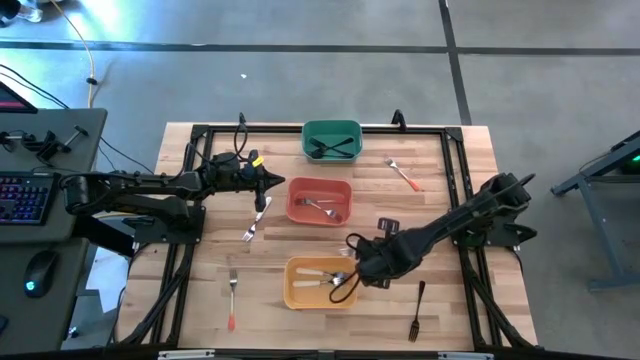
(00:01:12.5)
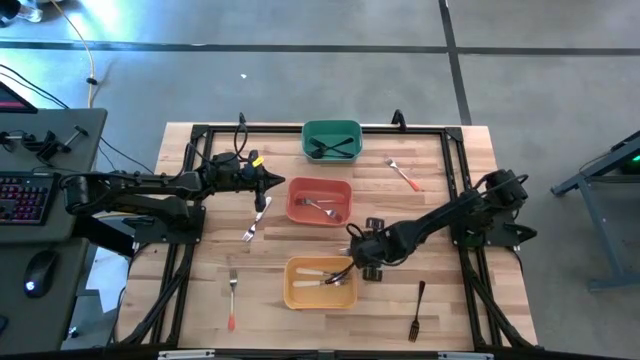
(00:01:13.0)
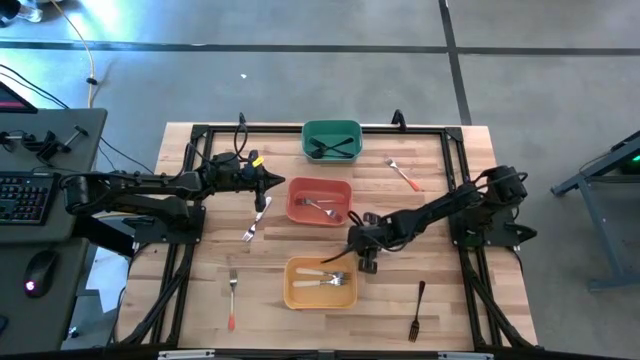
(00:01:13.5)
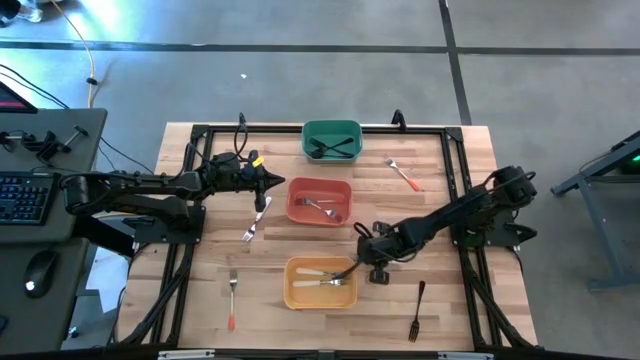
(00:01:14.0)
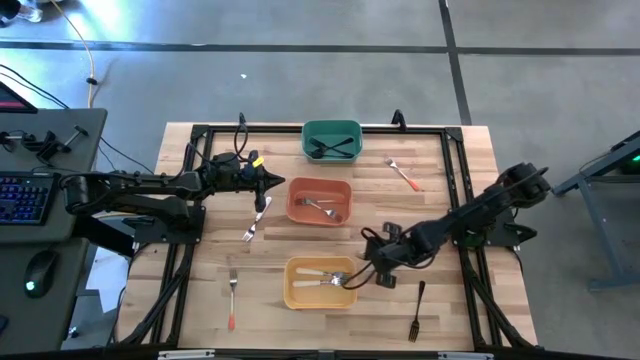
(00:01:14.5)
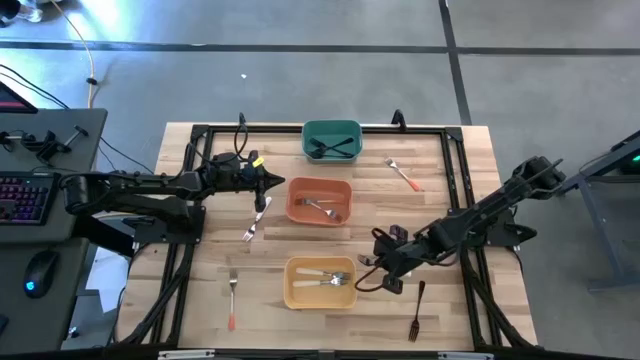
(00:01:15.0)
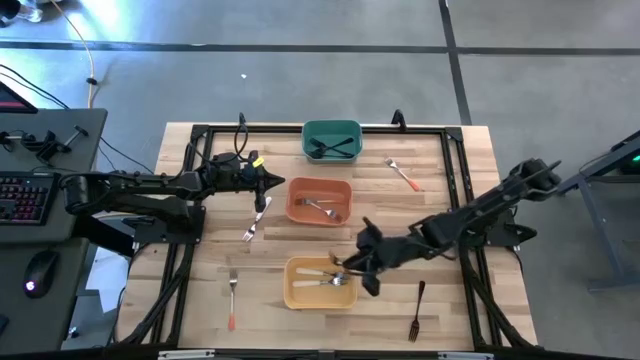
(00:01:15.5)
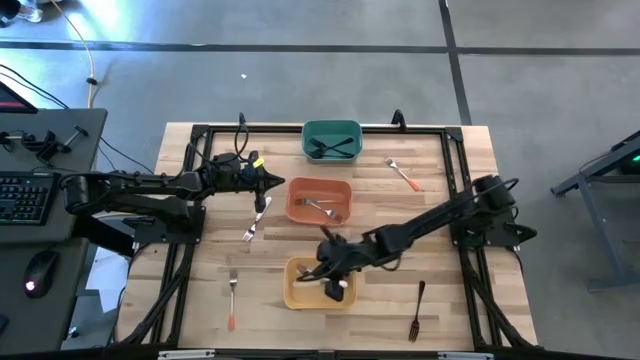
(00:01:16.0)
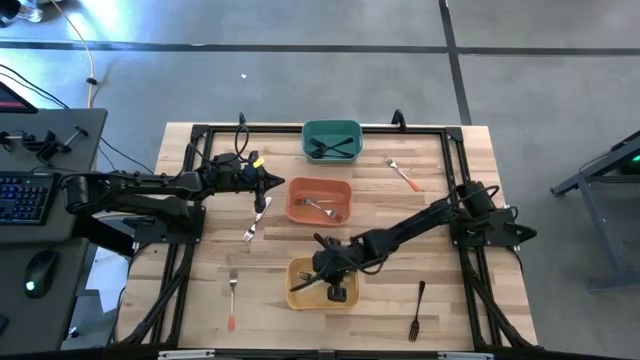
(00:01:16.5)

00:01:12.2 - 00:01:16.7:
Task: Sort silverware by color (type)
Put the white fork into the yellow bin

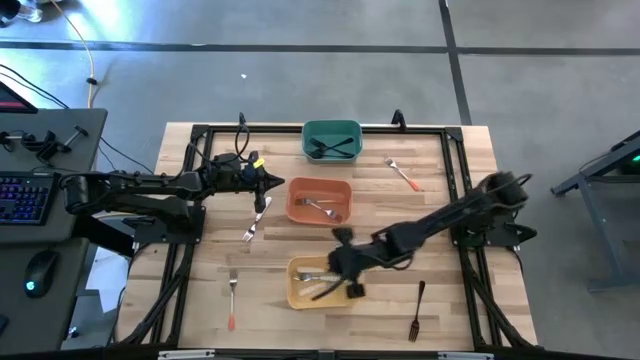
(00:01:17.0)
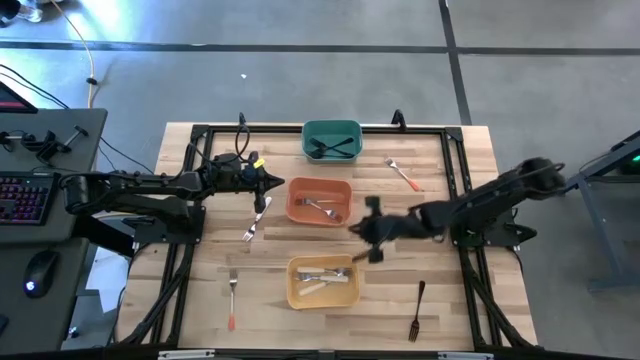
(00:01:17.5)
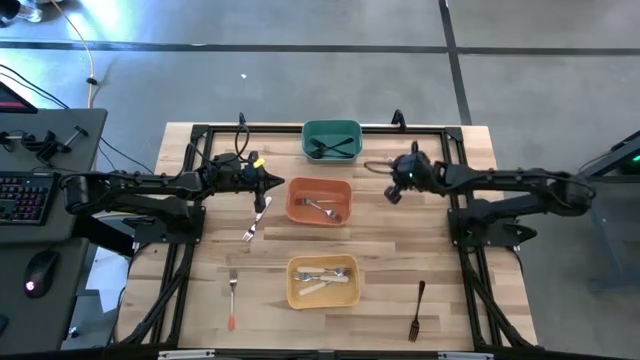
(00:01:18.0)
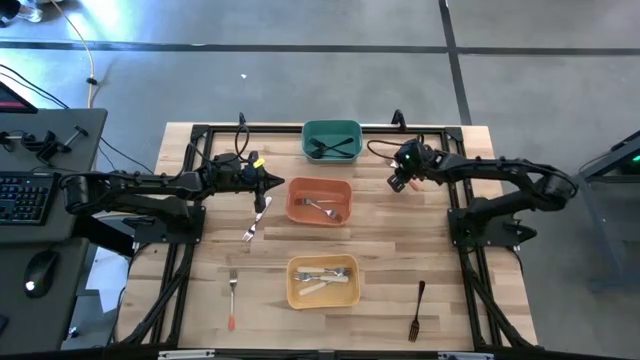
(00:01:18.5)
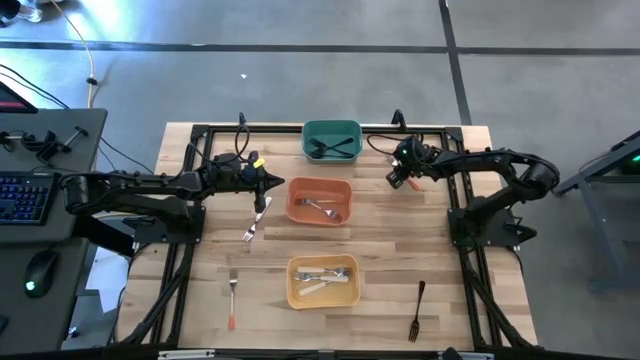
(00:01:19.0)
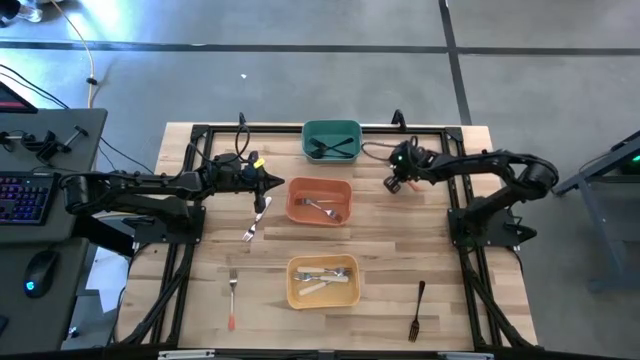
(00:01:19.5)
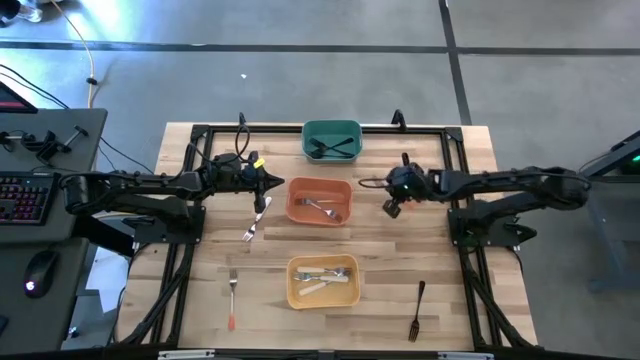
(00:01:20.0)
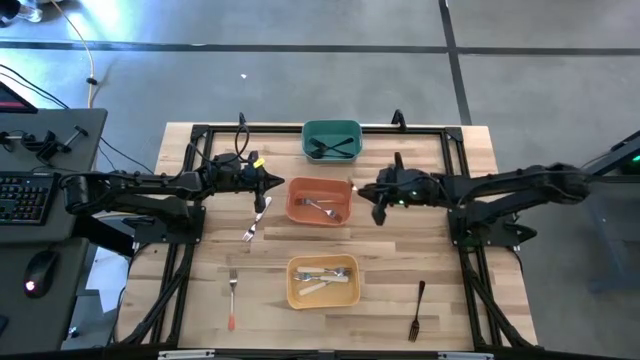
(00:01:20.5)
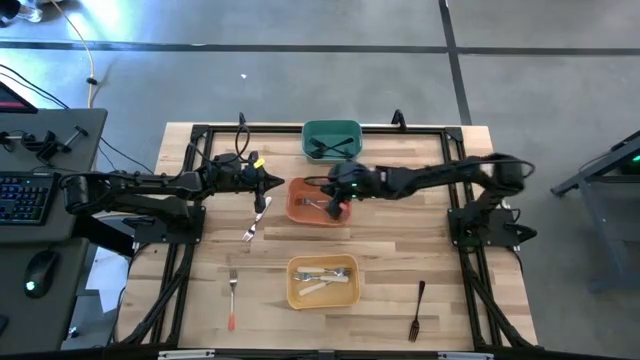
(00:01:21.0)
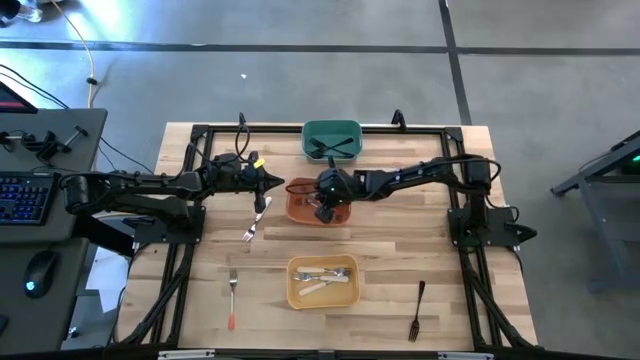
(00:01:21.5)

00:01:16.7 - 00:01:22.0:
Put the orange fork into the orange bin

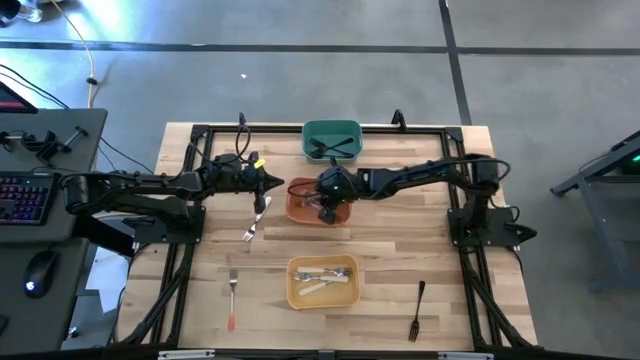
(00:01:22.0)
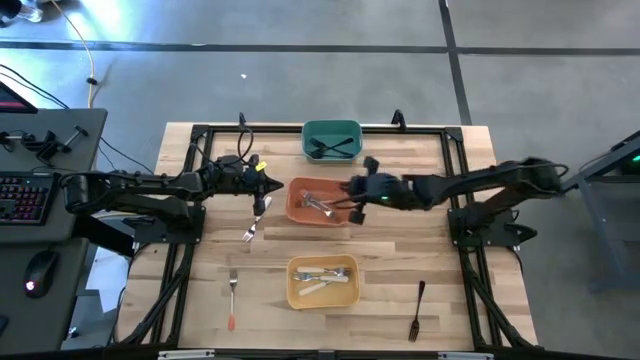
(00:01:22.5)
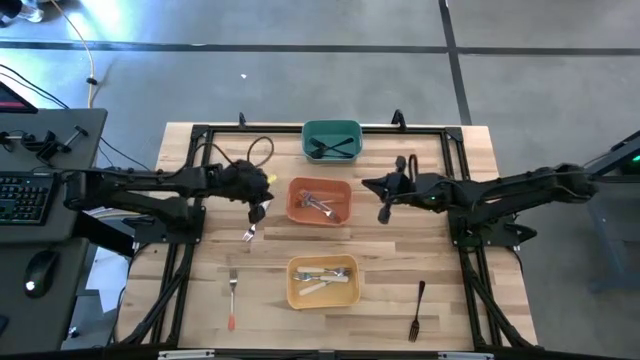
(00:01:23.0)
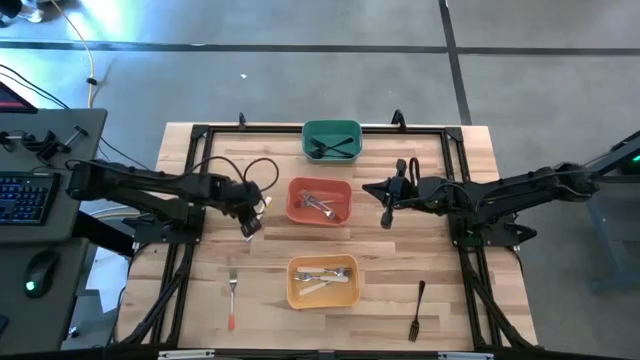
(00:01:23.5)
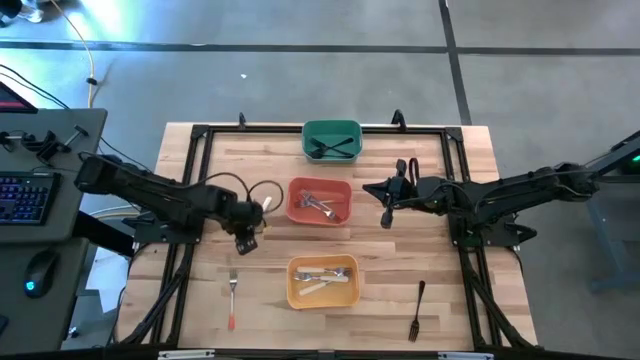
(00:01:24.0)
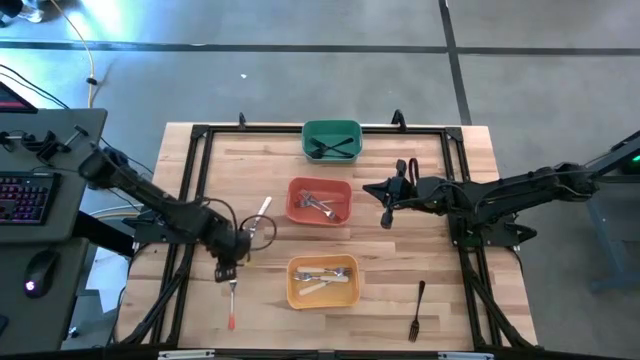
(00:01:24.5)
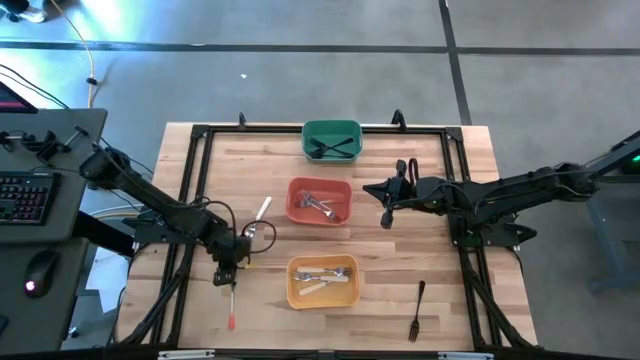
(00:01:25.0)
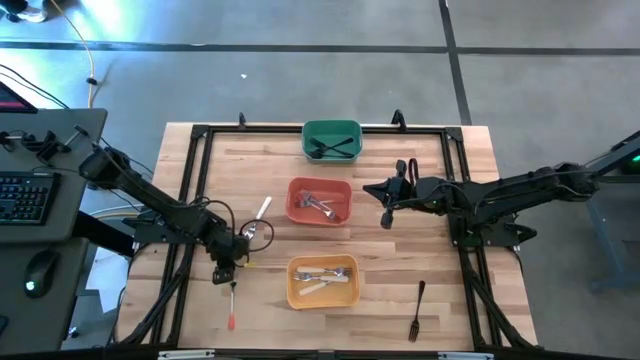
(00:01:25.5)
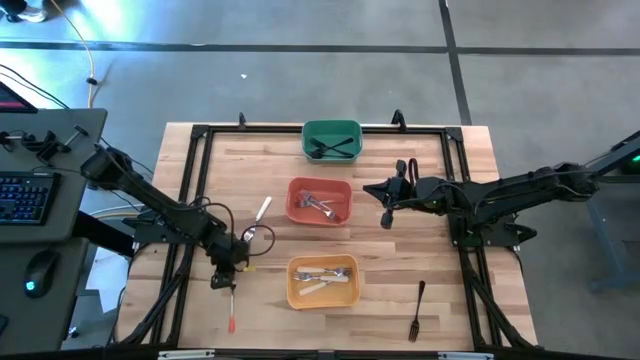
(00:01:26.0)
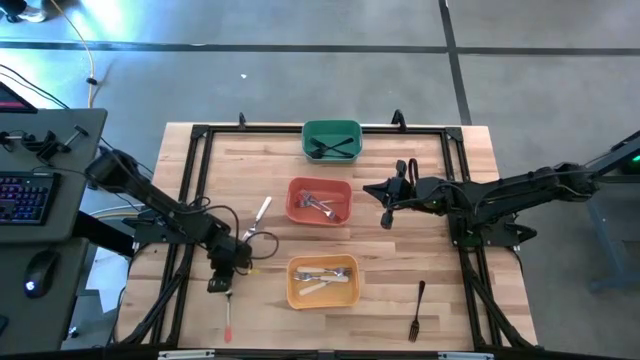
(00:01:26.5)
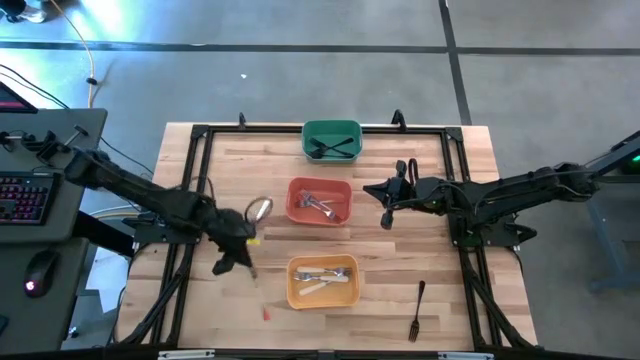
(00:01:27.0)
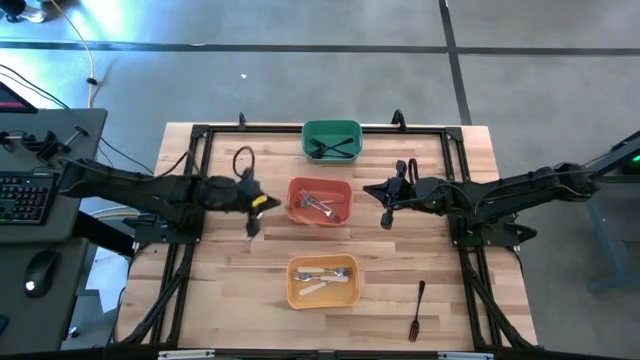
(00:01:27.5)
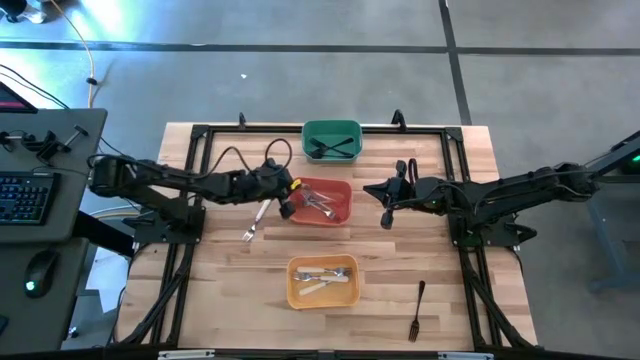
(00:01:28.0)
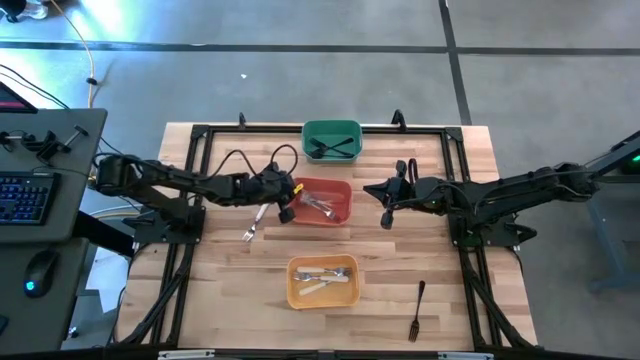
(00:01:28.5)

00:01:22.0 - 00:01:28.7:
Put the orange fork into the orange bin

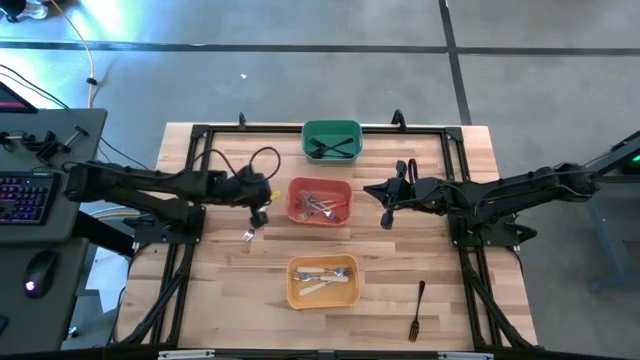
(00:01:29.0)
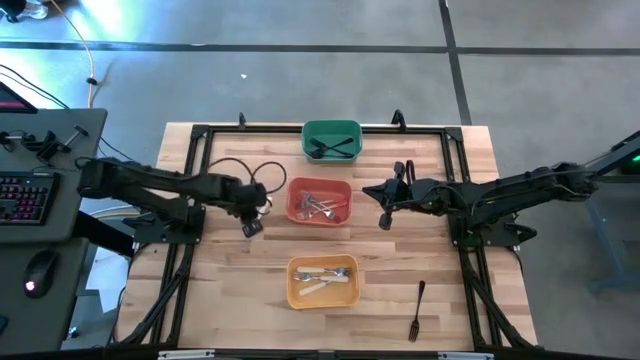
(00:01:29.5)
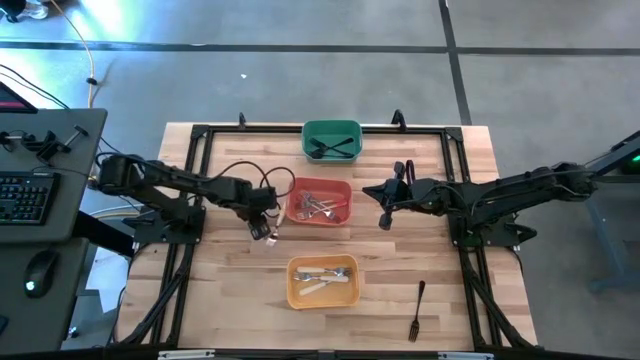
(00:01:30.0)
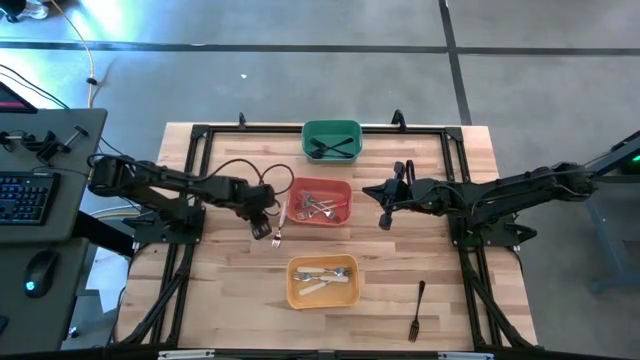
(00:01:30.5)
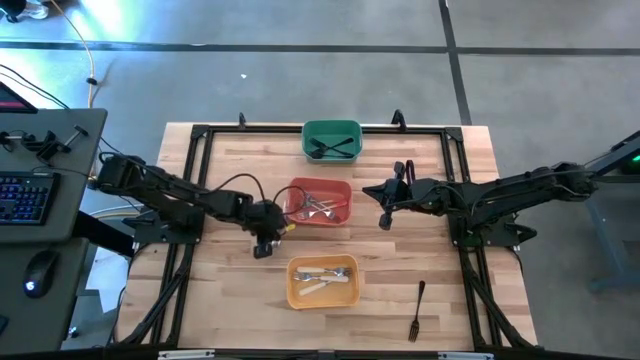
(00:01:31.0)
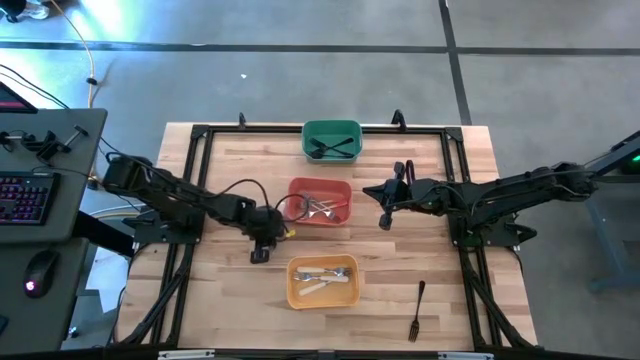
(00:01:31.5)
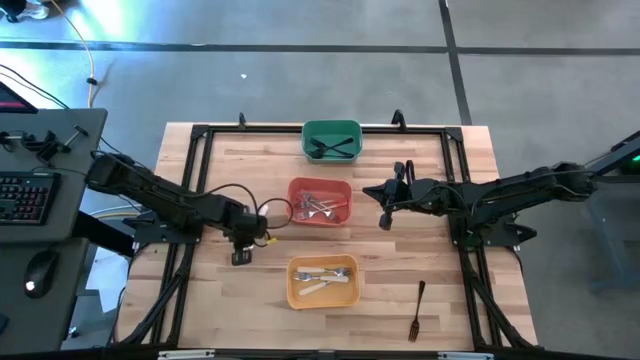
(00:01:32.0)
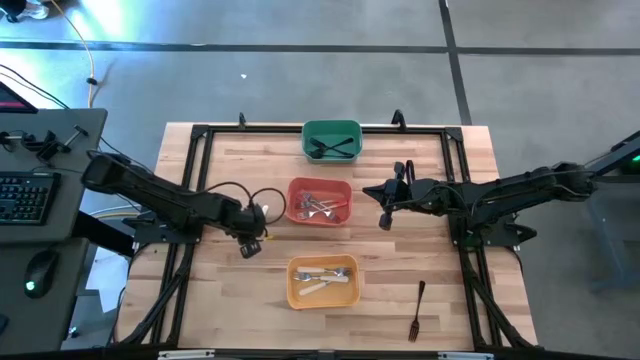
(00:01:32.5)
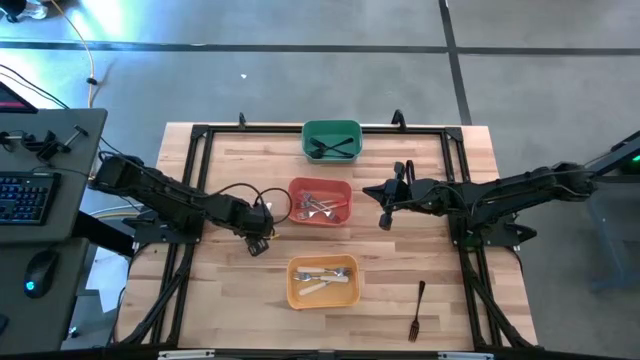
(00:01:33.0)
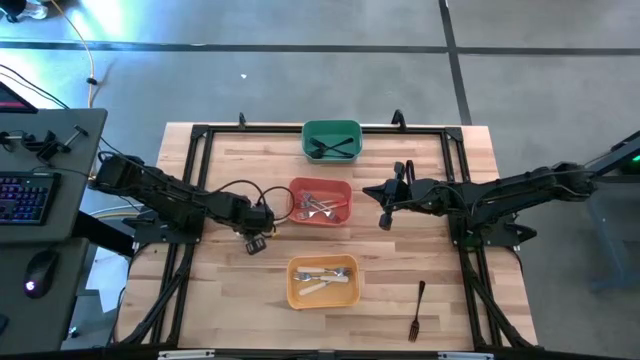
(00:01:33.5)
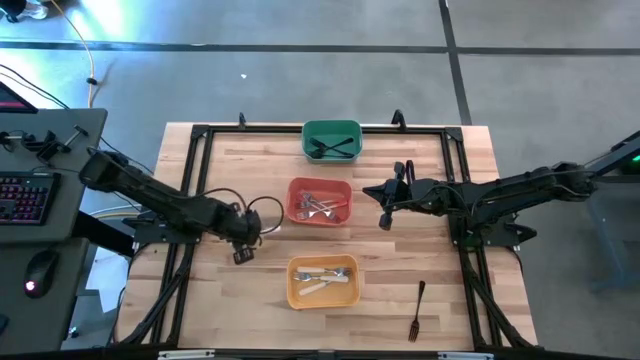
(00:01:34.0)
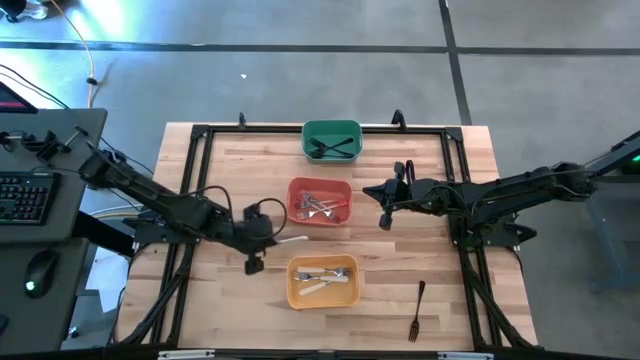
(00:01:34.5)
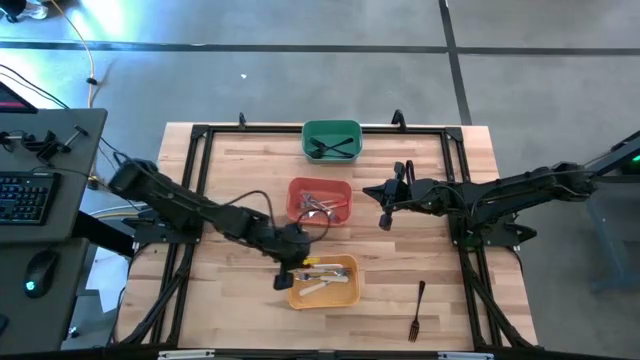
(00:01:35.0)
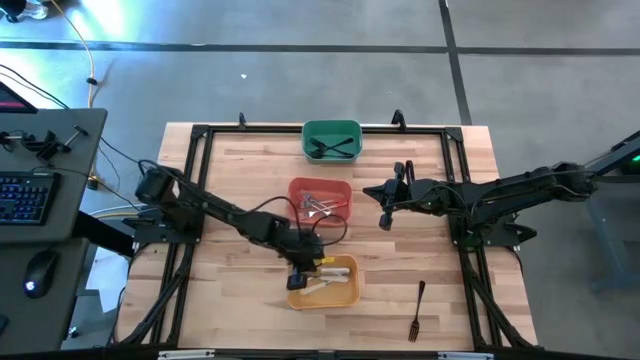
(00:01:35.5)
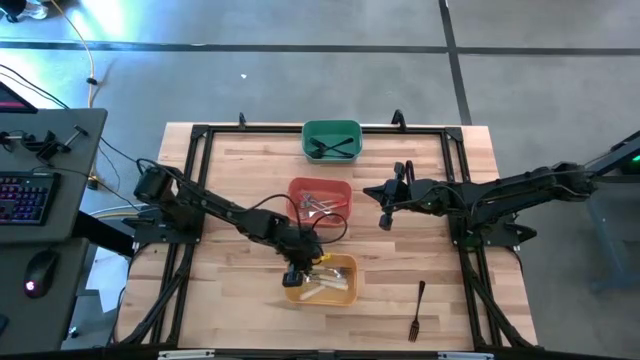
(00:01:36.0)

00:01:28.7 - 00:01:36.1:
Put the white fork into the yellow bin
